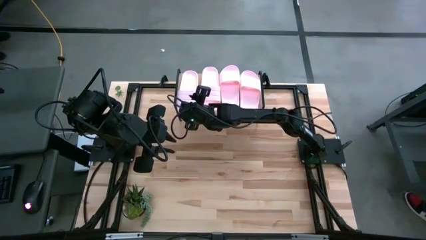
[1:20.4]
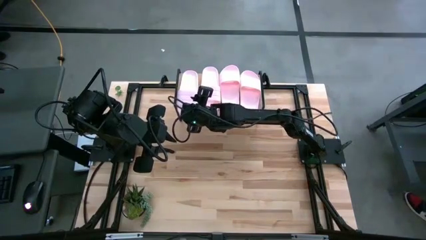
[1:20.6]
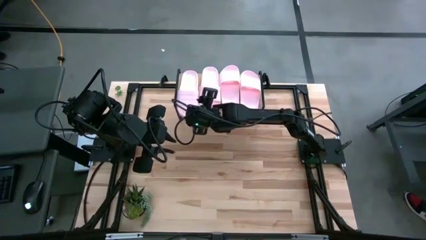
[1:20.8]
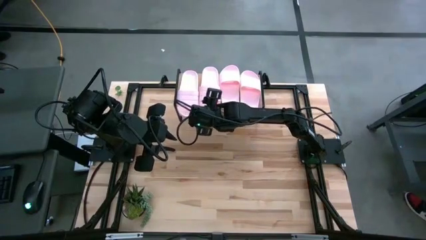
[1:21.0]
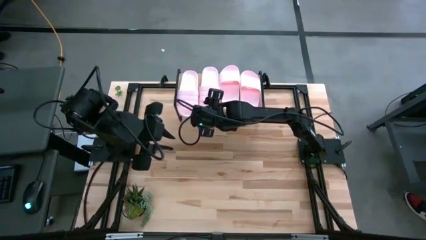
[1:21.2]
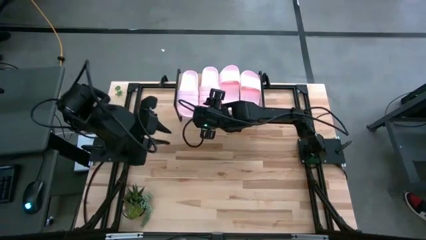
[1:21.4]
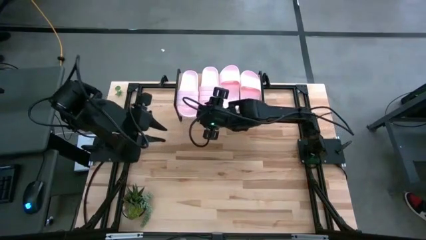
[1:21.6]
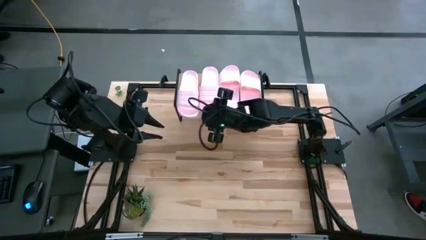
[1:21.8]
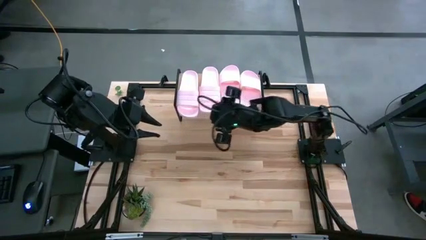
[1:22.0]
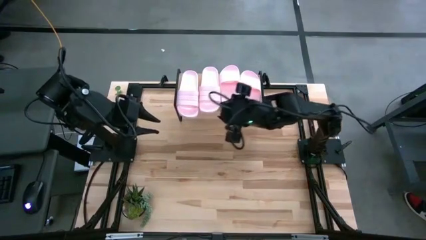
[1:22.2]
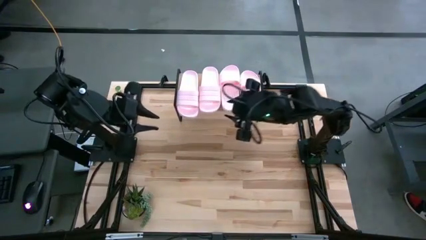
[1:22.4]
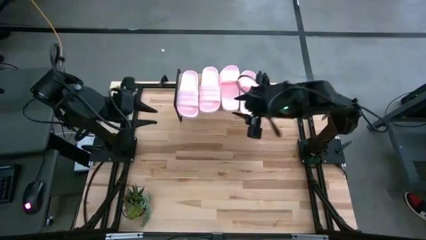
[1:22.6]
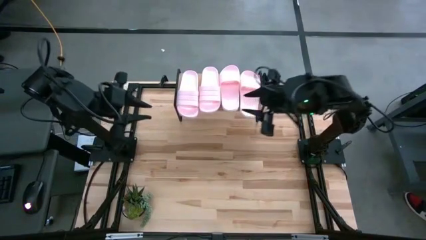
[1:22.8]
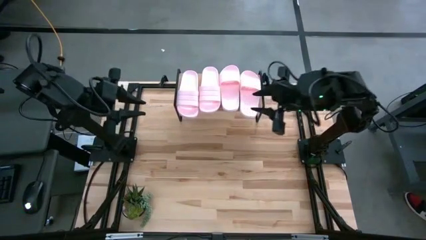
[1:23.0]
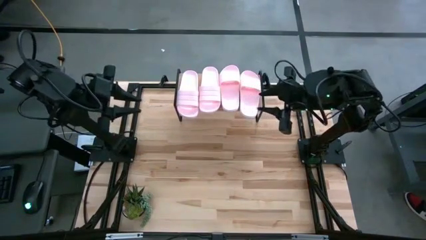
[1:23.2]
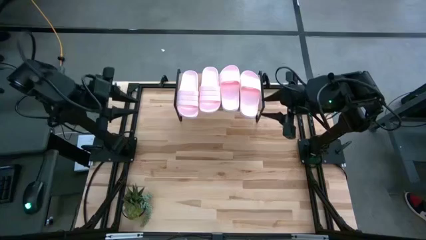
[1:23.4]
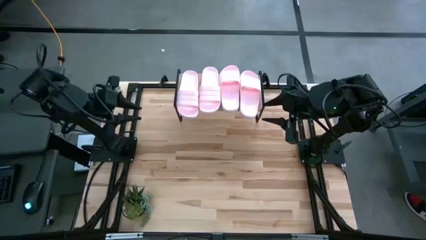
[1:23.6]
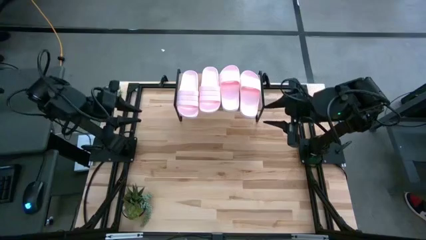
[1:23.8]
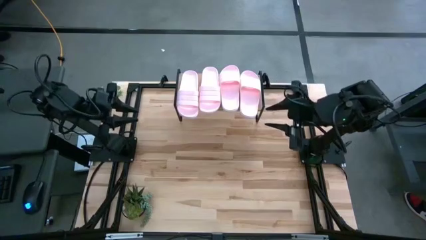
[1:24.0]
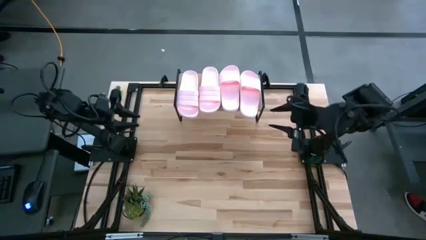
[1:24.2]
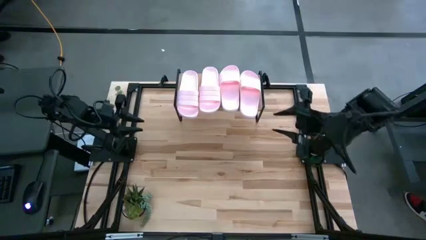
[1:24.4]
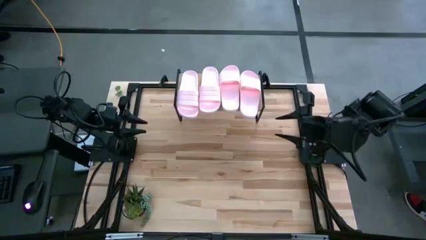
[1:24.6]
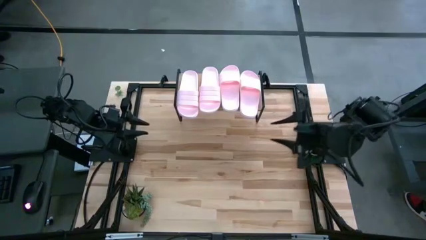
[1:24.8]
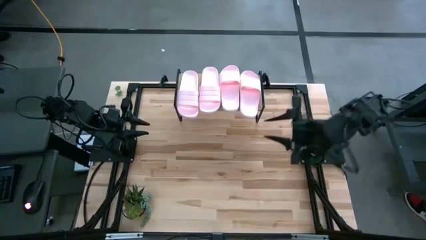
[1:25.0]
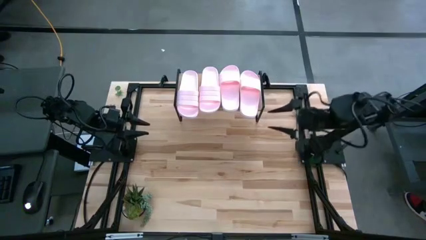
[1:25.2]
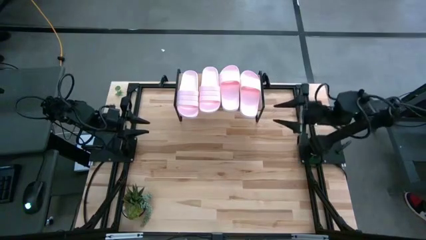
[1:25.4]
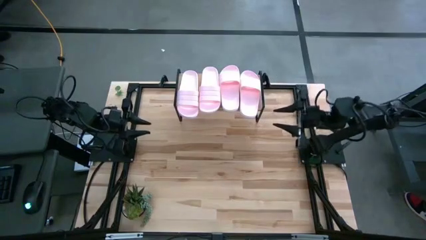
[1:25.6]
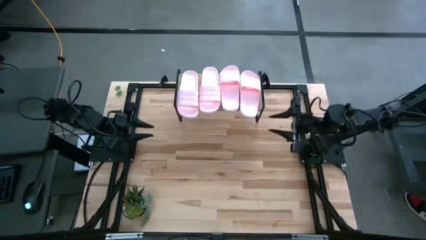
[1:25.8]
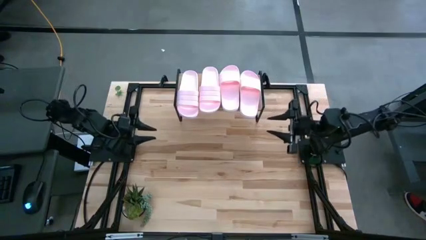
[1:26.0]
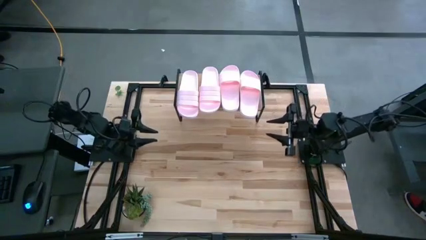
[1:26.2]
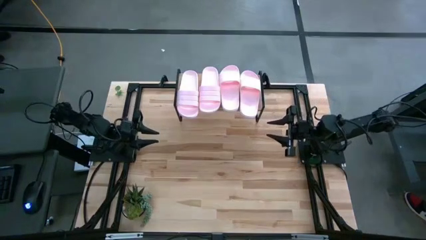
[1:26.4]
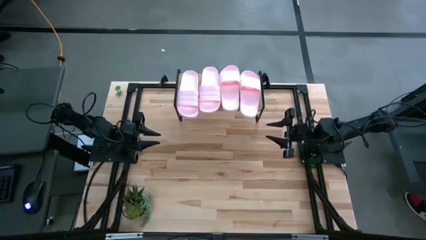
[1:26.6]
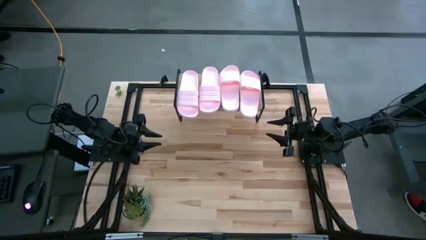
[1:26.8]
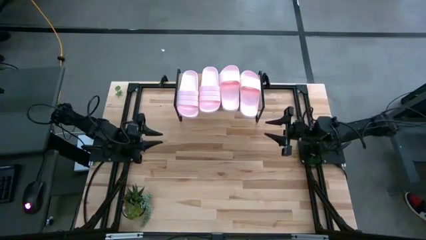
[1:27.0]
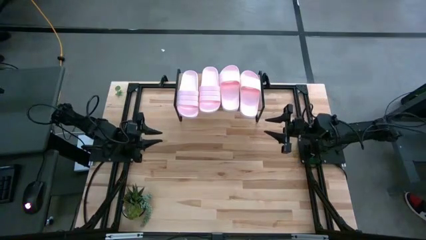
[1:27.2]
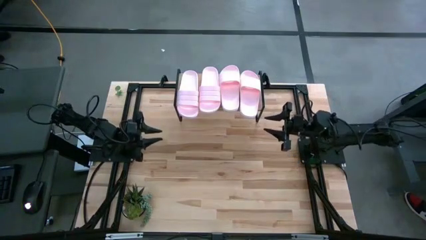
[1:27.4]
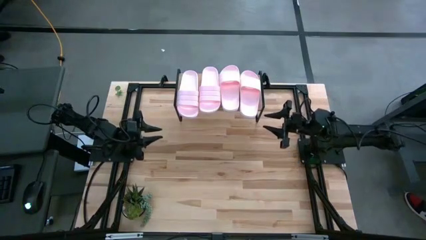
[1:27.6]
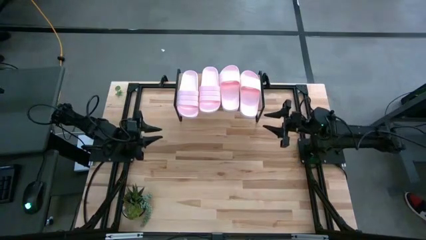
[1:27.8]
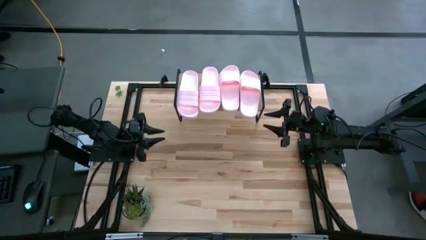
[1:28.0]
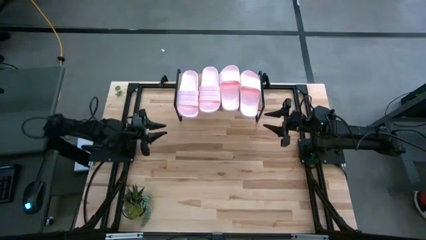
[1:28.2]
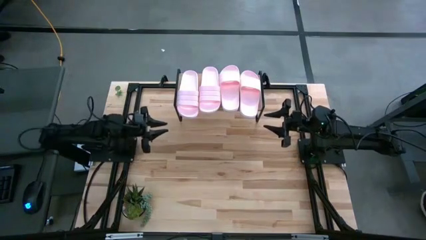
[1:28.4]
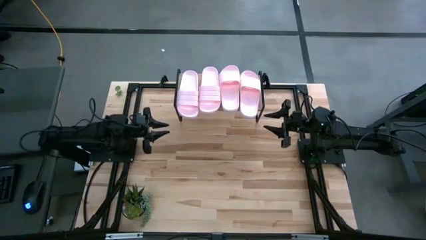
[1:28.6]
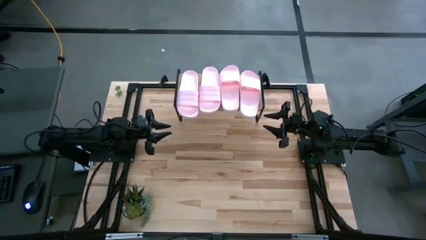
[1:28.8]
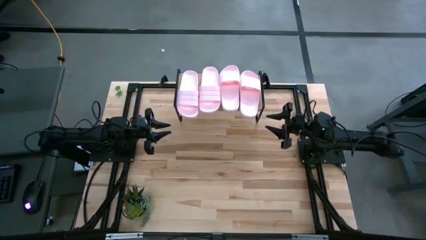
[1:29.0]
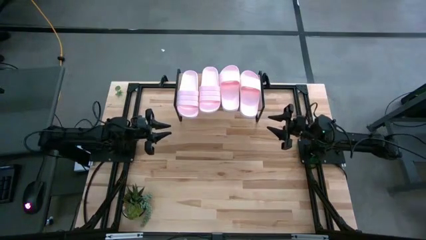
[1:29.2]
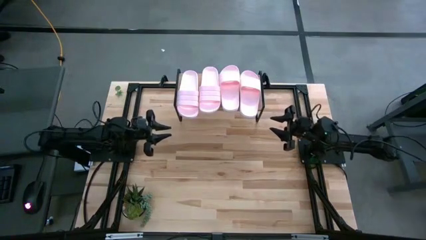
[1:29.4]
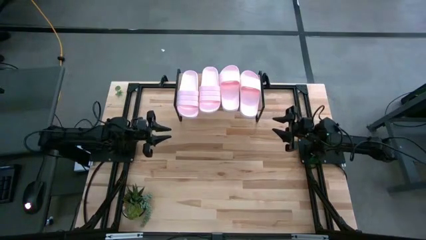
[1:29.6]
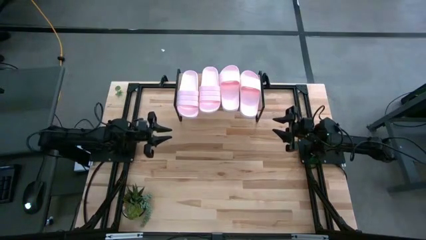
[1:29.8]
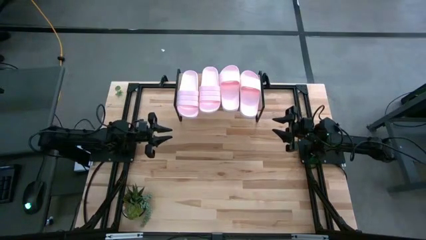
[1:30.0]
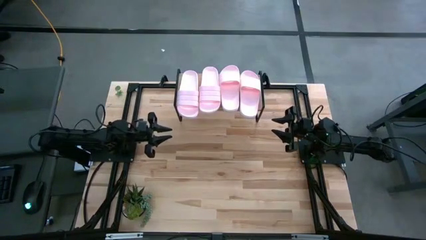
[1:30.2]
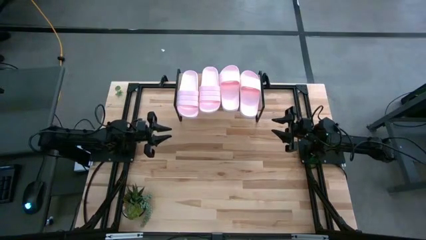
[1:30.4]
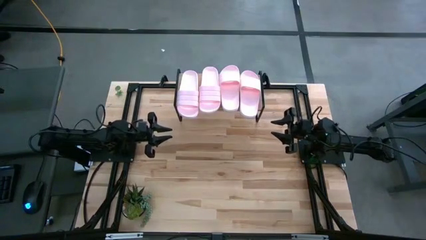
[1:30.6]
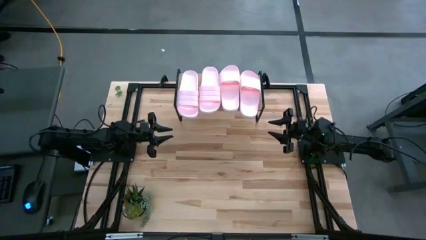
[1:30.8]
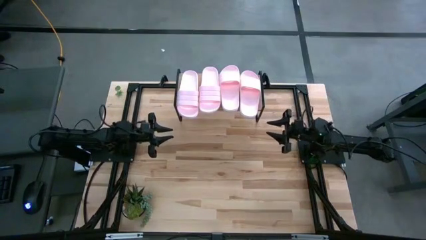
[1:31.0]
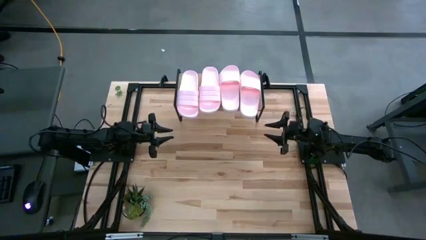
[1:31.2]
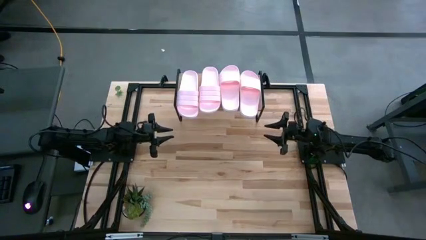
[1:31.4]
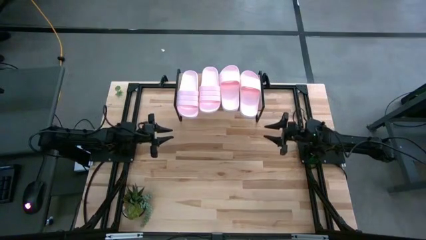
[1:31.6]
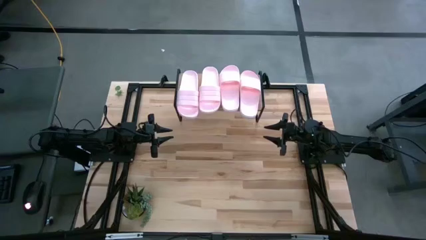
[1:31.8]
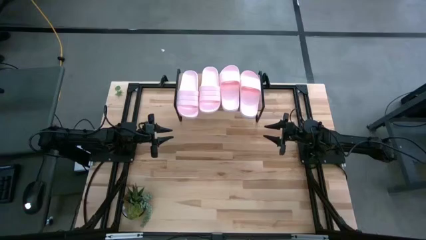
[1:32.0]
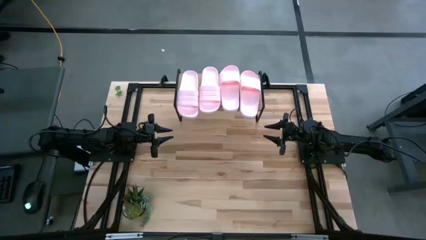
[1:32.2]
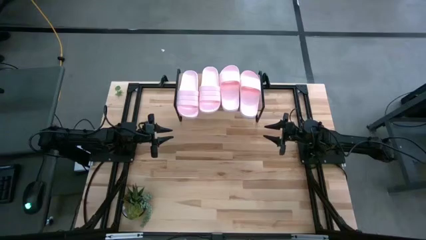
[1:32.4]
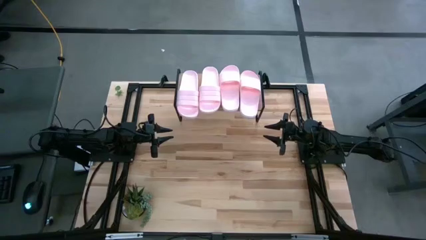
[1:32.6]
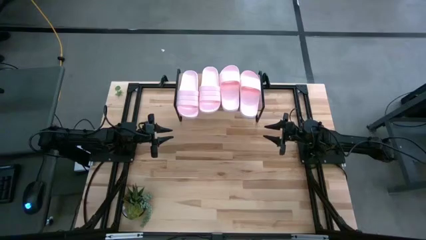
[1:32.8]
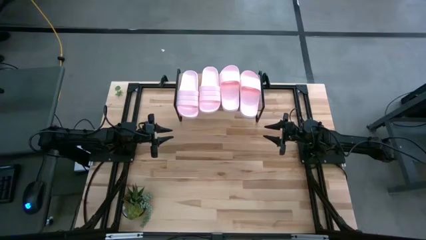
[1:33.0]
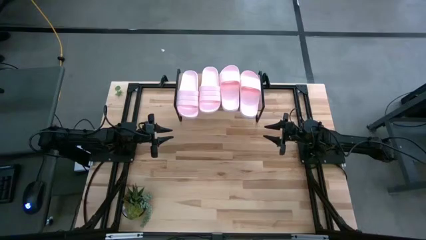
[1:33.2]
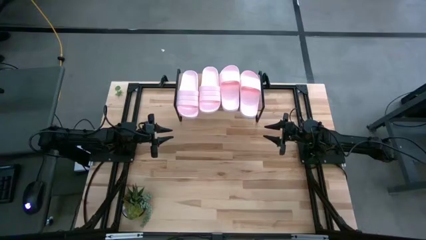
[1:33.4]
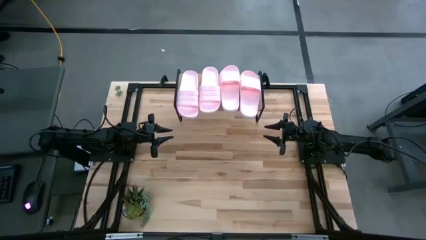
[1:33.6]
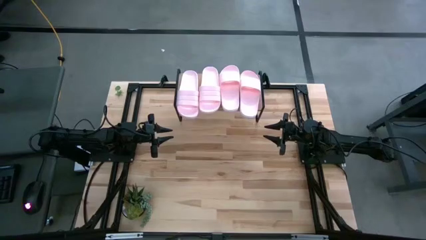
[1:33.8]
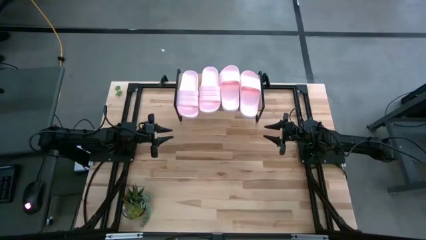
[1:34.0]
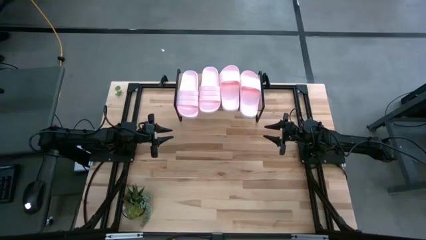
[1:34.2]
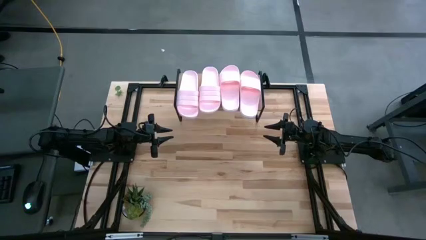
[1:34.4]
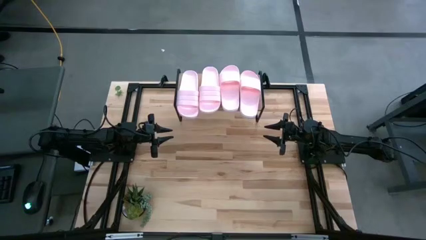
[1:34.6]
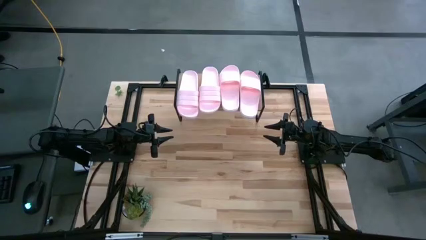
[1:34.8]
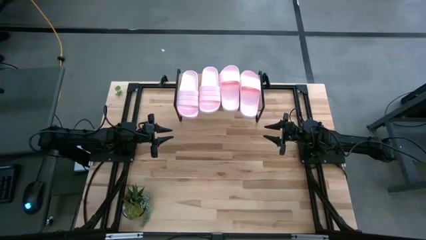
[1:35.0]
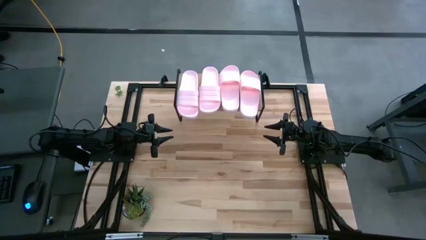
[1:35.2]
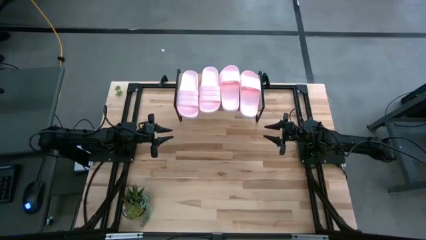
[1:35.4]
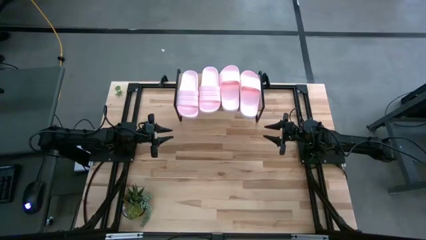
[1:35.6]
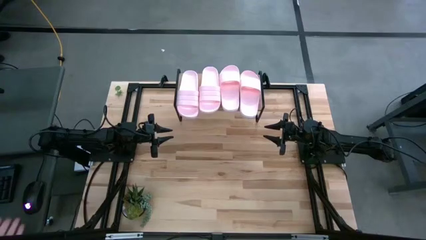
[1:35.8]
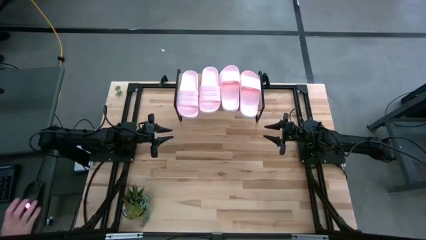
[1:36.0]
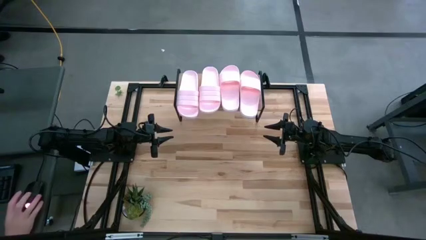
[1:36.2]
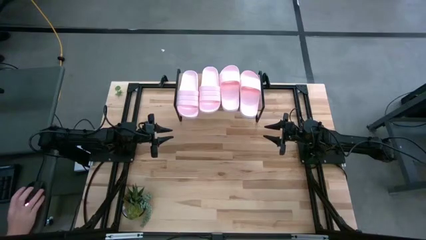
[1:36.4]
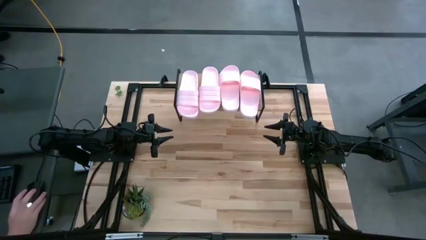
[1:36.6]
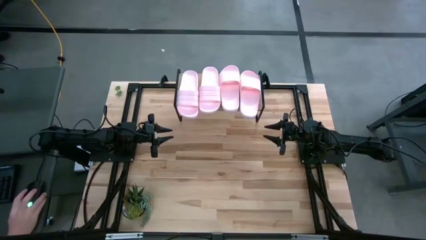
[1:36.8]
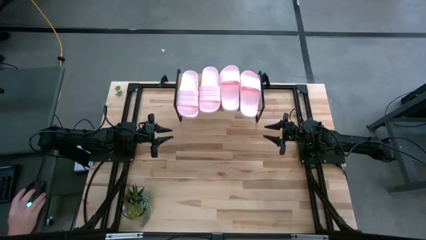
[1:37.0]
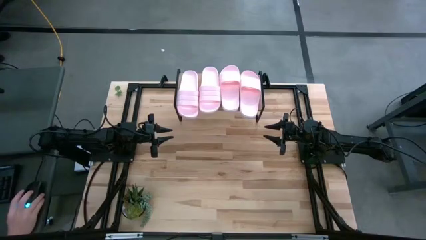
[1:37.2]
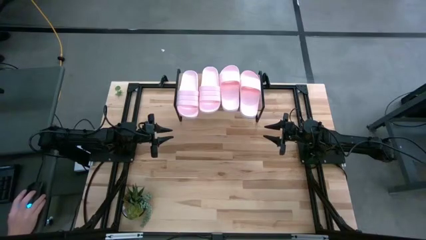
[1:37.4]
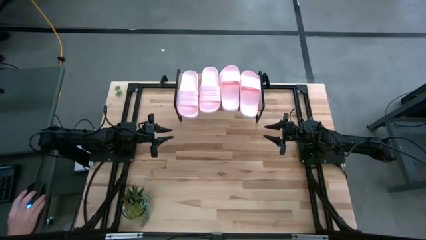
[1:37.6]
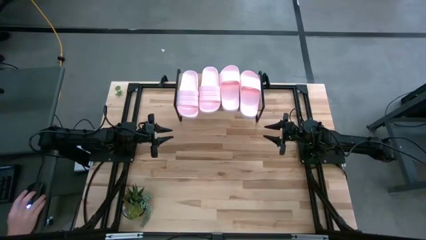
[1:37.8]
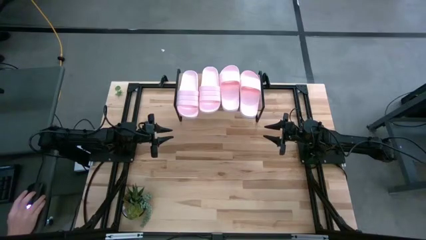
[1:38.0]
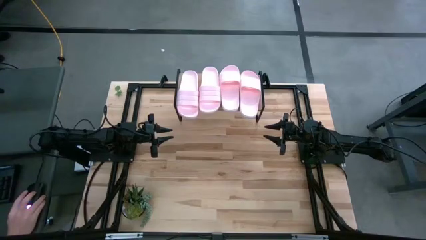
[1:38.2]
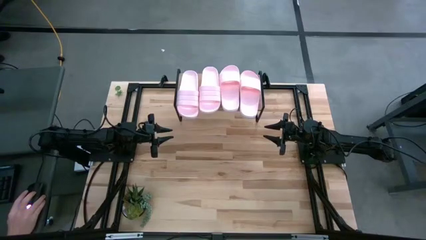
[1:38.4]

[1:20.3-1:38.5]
Task: Pick and place slides into the shelf
Return to Home Position
